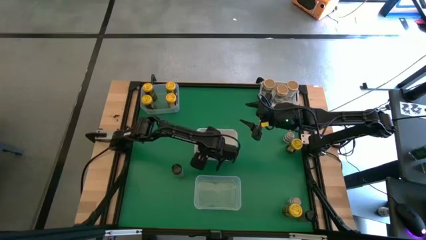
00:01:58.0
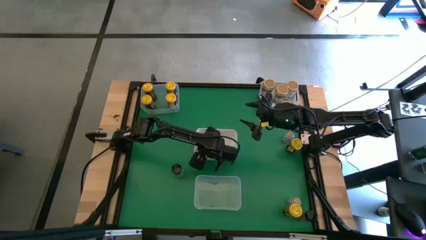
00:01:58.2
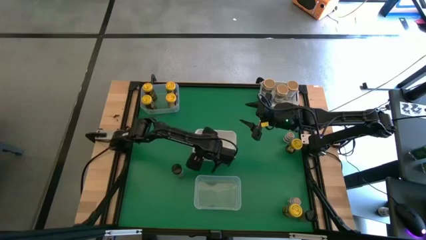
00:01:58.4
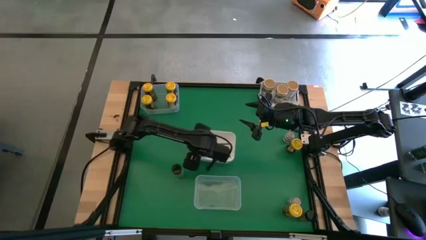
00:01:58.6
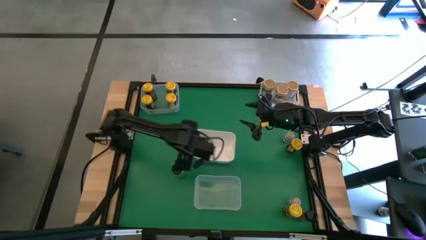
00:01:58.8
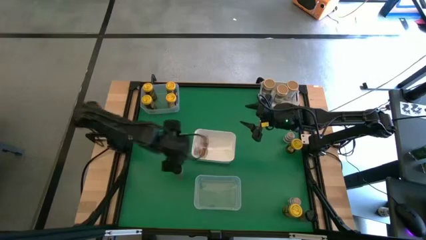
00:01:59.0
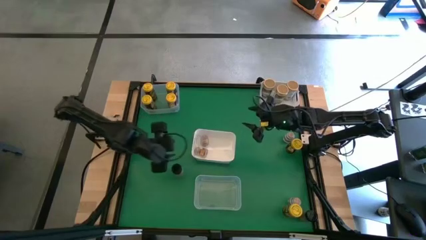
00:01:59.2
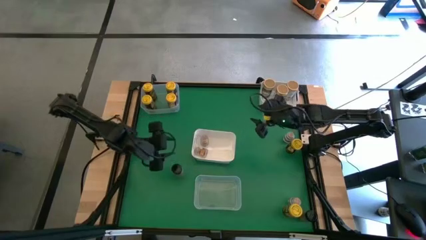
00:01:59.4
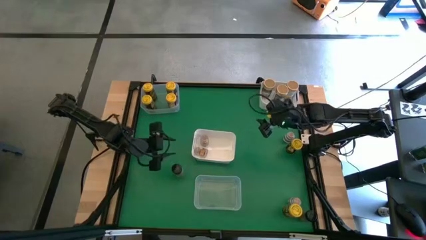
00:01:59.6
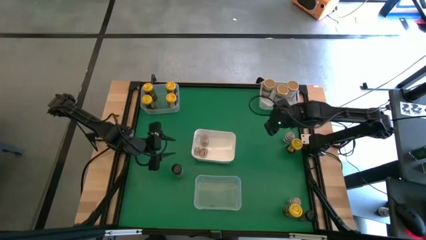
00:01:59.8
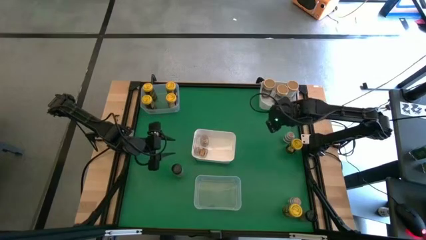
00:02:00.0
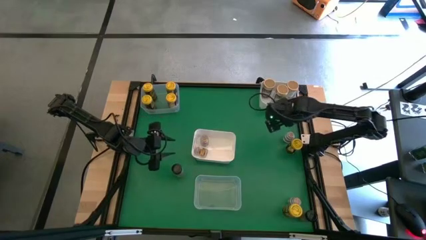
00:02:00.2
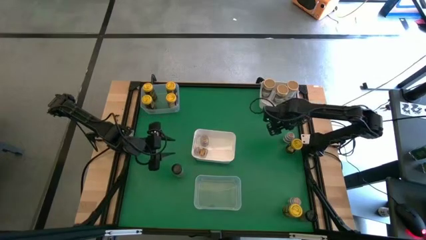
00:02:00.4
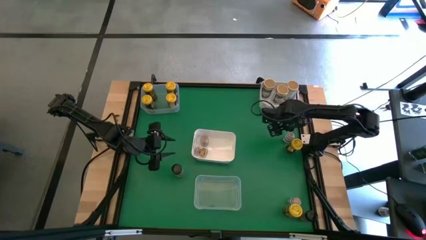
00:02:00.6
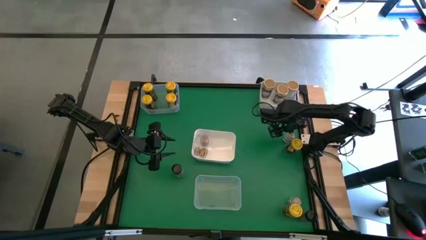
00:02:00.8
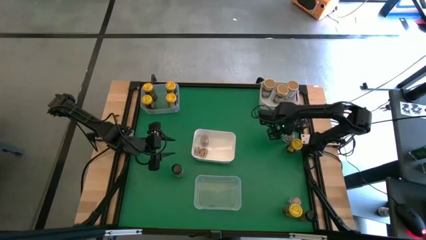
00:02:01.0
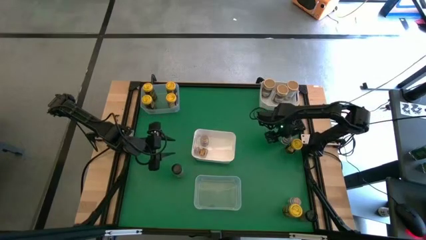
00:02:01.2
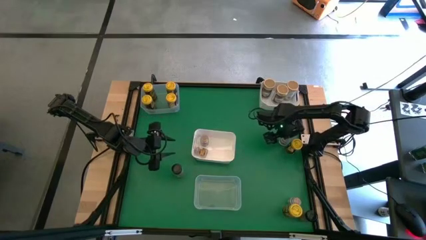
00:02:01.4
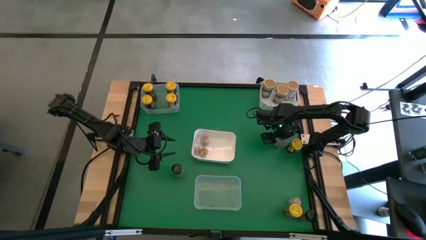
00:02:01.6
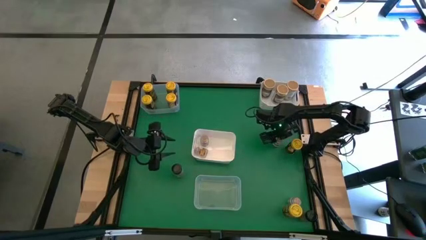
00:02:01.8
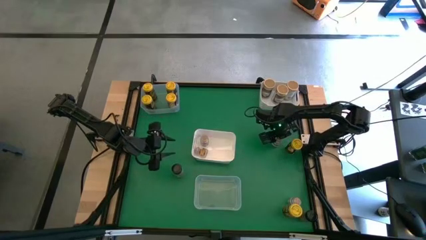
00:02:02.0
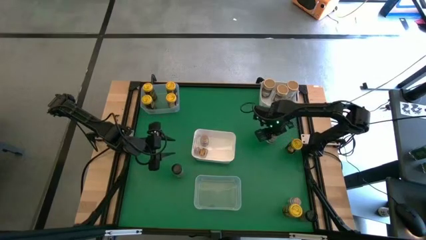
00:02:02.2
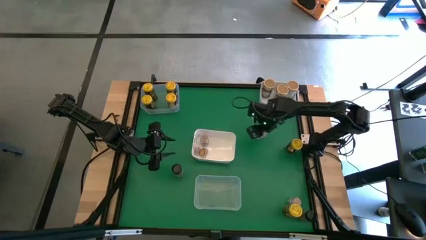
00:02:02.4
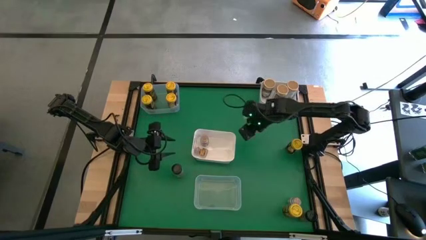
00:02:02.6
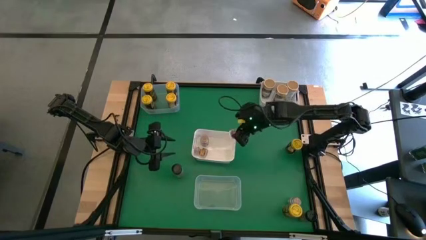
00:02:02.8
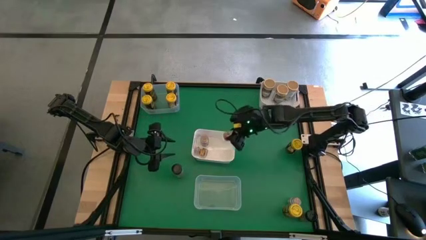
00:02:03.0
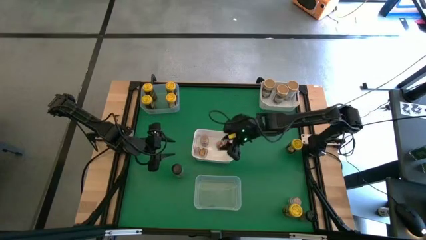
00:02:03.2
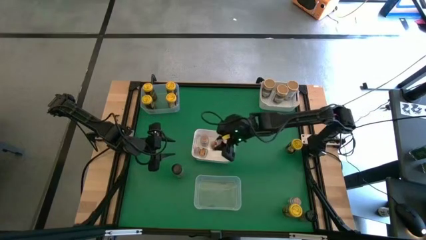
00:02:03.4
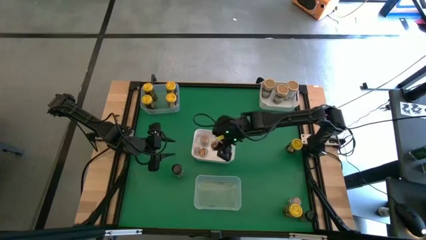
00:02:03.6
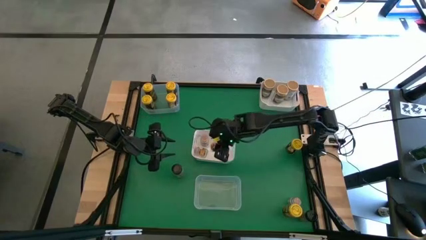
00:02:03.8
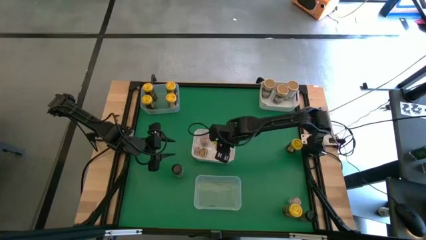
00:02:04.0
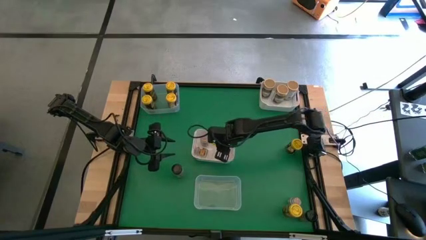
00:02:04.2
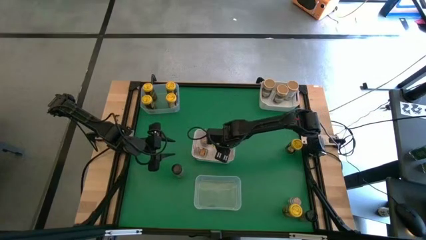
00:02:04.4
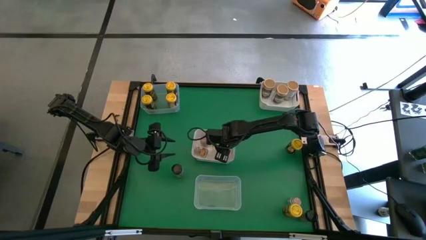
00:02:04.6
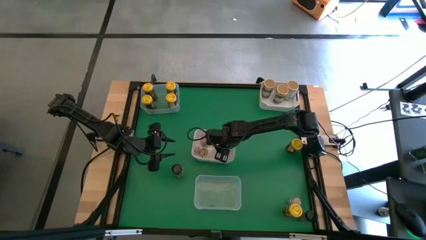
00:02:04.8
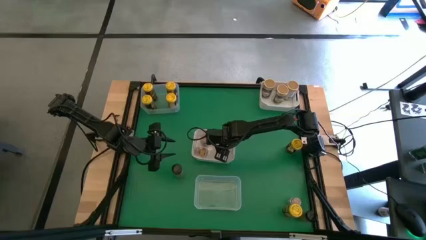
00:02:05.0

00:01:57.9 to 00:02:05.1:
Task: Sort spices by type
Put the top brown seasoning bottle into the bottom white bin

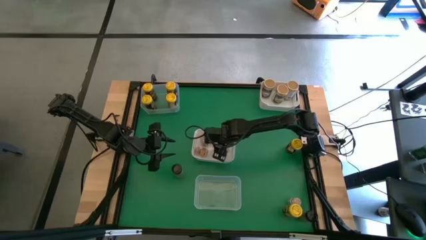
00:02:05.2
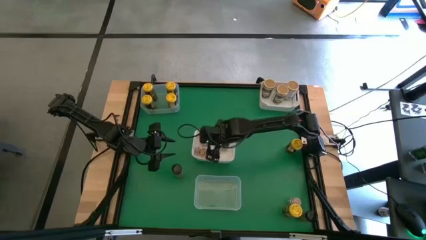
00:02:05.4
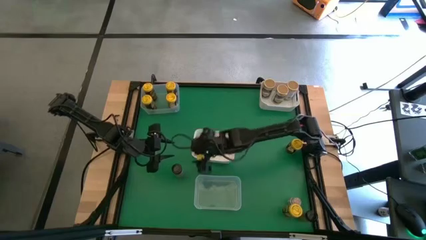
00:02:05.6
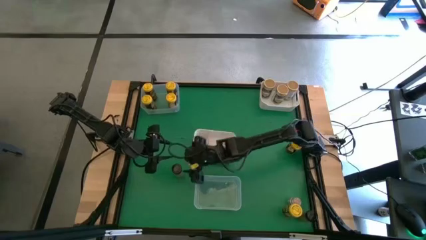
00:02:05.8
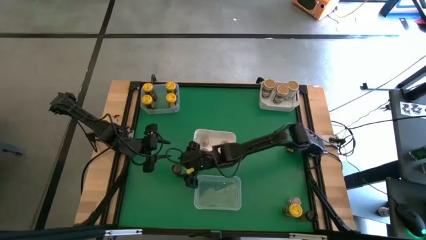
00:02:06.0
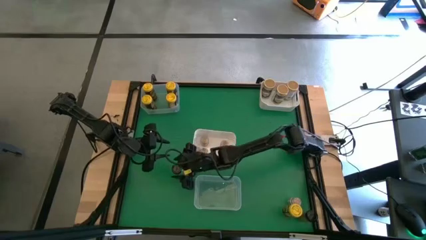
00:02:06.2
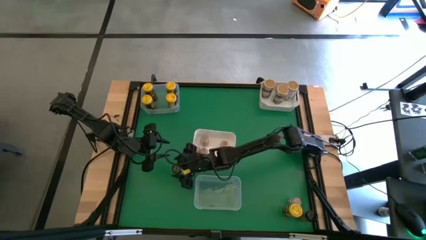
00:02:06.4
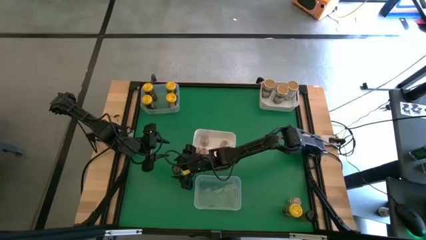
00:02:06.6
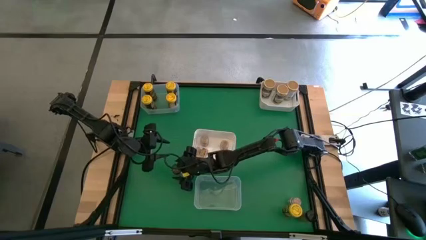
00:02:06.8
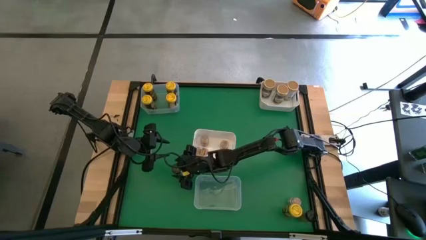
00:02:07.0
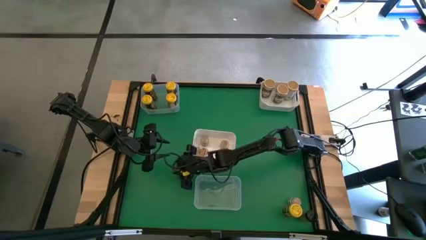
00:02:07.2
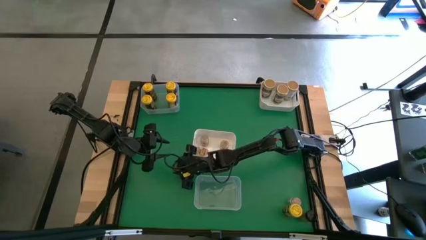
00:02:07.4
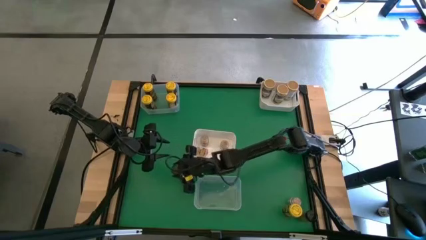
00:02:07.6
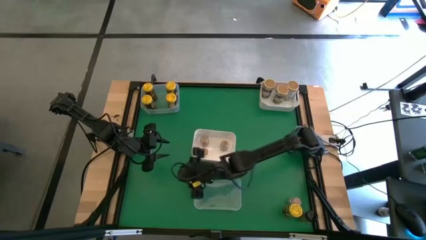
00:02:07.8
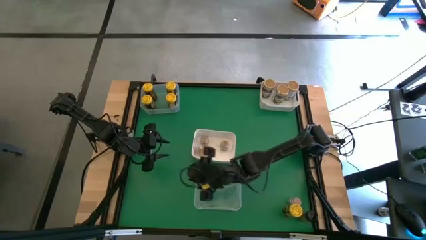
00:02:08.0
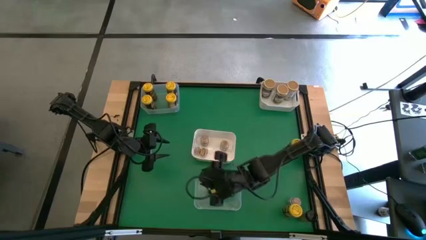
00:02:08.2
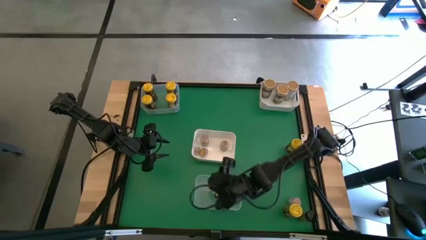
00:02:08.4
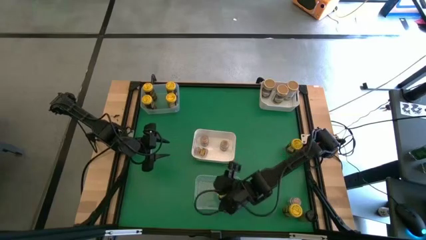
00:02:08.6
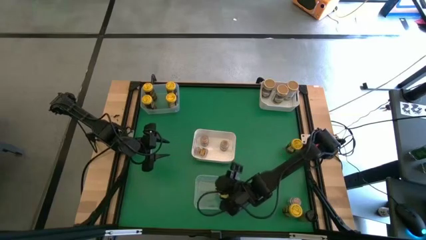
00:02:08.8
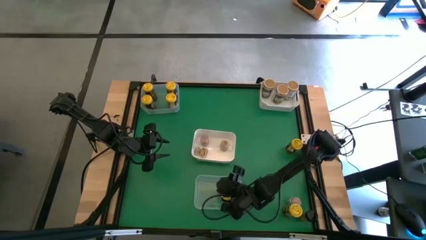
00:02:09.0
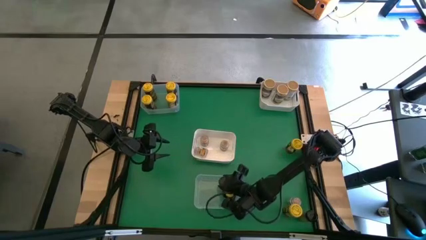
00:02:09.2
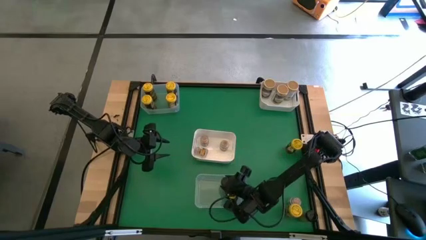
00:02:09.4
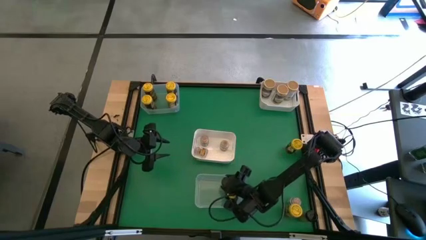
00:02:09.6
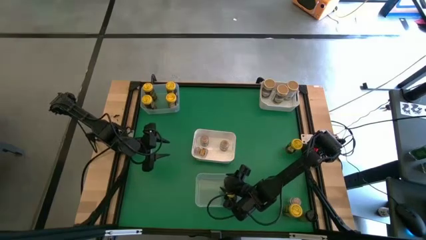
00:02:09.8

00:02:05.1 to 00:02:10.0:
Put the left black seasoning bottle into the bottom transparent bin

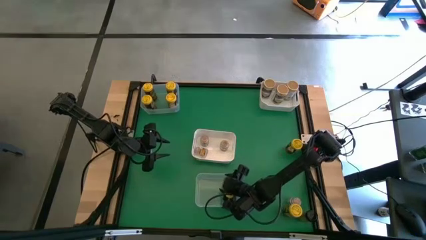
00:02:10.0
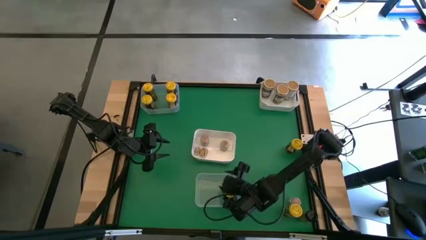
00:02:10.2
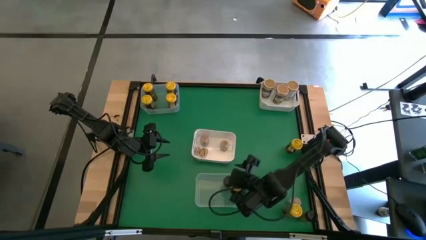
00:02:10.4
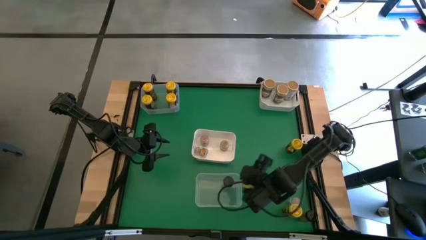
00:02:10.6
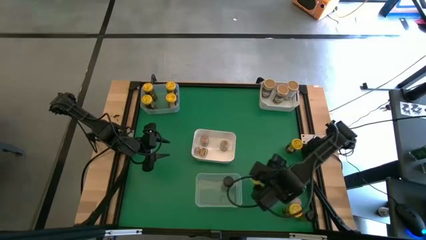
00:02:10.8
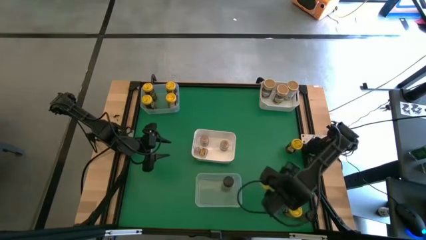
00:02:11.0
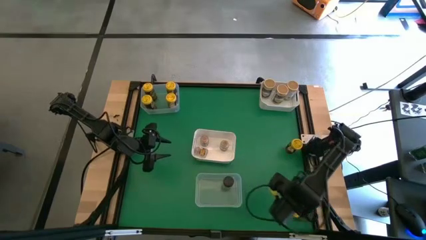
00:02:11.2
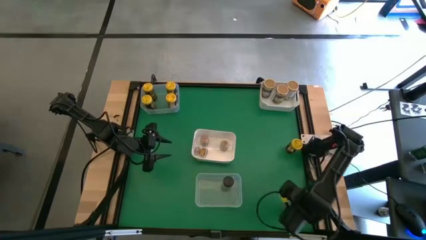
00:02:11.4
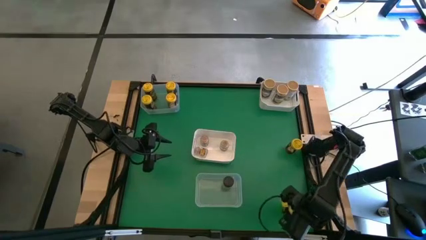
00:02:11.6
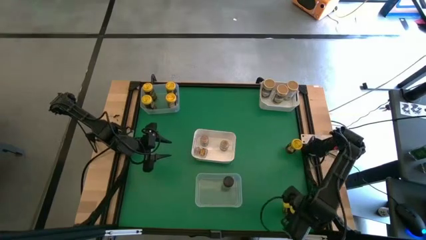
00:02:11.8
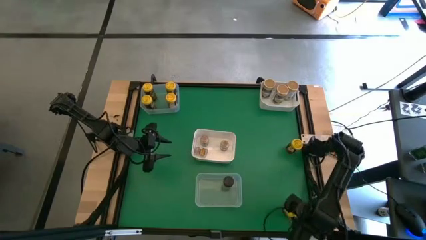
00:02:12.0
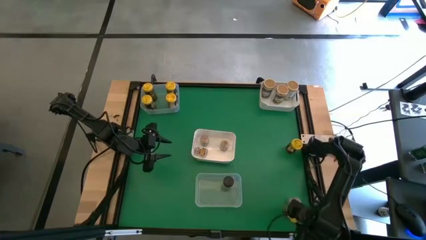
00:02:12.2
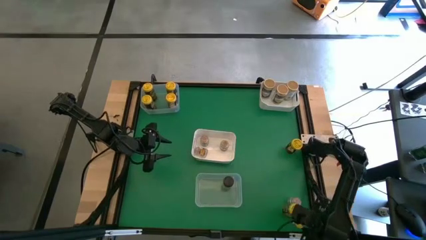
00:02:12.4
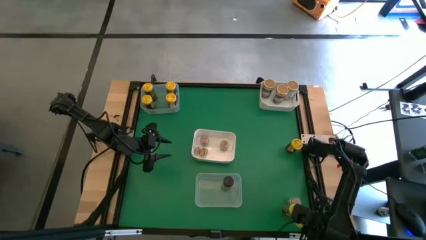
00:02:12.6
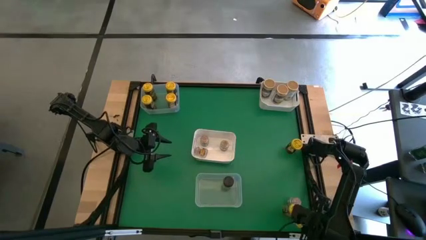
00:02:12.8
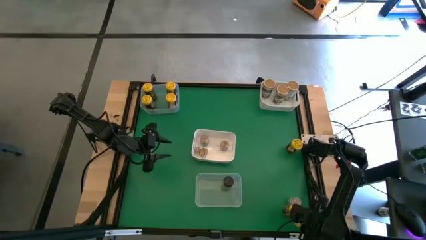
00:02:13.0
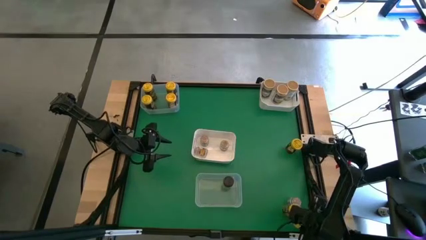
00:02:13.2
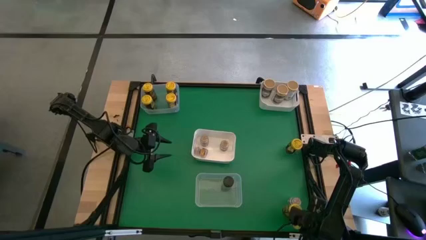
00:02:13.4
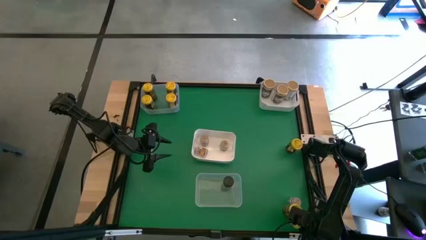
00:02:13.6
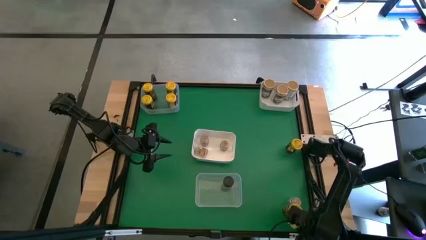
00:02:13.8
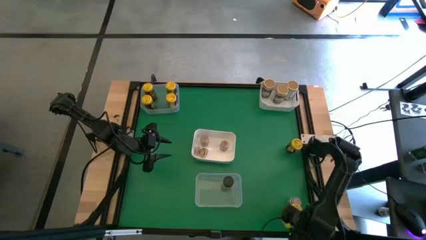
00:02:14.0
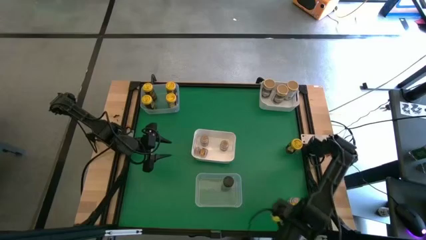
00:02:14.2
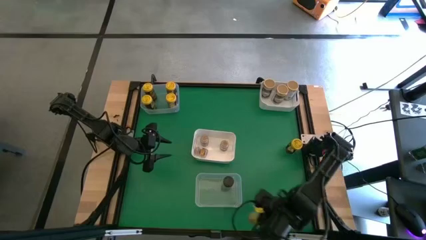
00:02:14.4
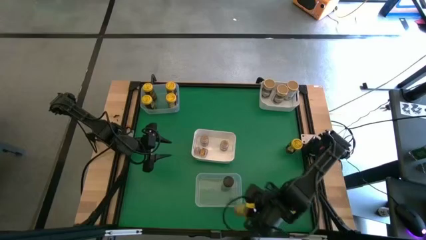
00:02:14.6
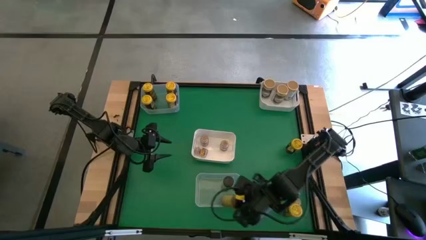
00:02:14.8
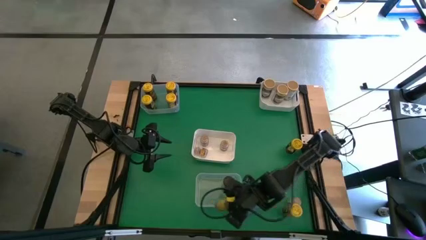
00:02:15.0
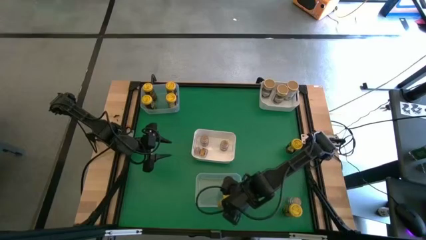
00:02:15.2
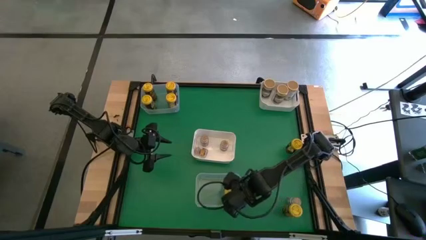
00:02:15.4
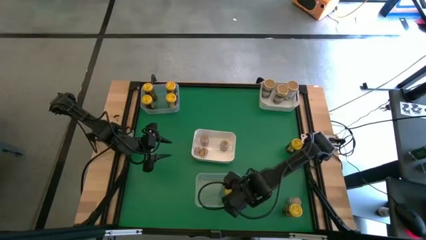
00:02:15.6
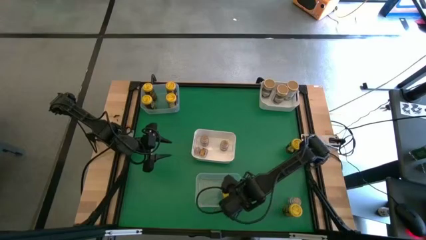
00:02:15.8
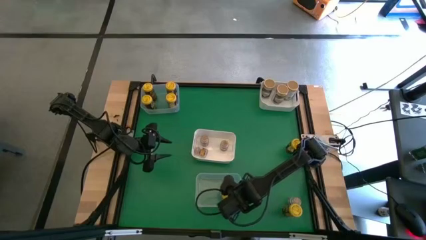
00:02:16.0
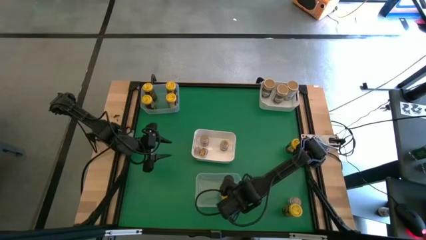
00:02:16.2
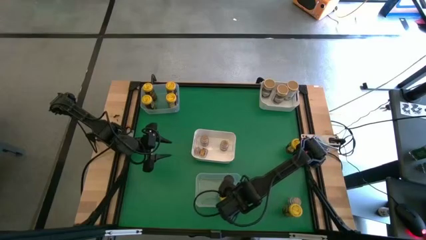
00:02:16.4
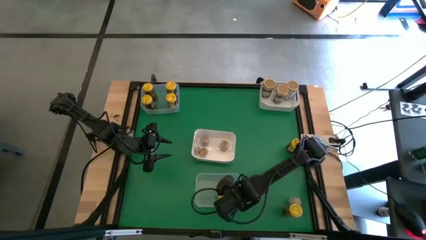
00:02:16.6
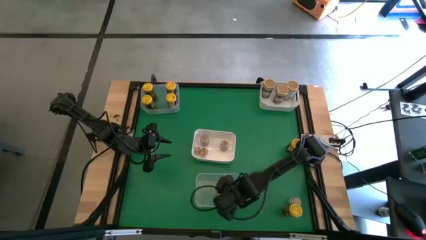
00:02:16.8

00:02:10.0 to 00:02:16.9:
Put the black seasoning bottle into the bottom transparent bin
